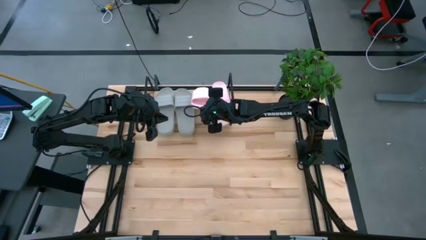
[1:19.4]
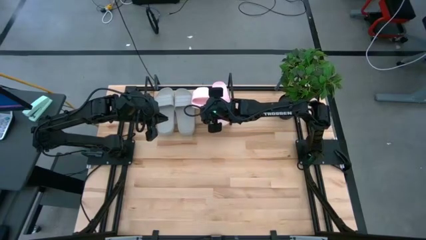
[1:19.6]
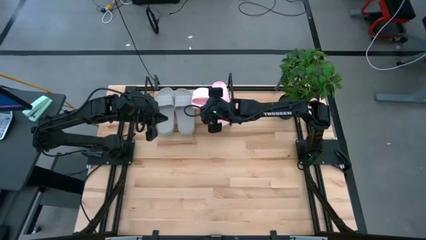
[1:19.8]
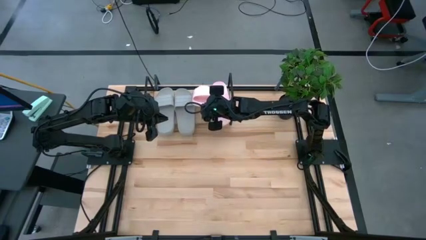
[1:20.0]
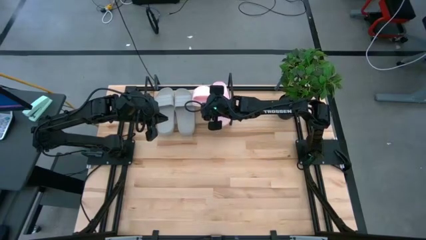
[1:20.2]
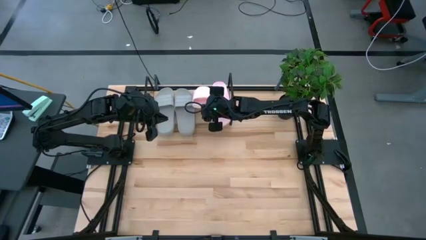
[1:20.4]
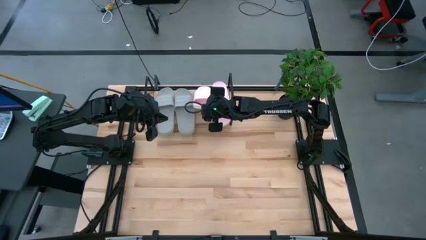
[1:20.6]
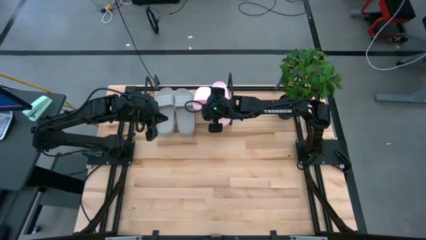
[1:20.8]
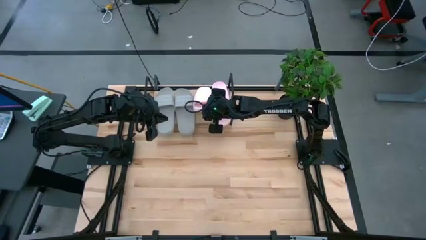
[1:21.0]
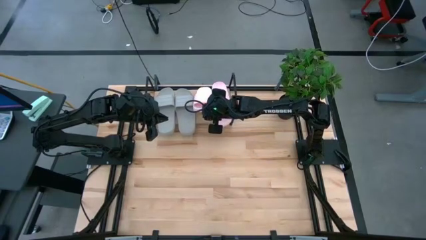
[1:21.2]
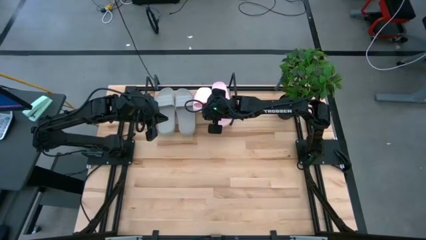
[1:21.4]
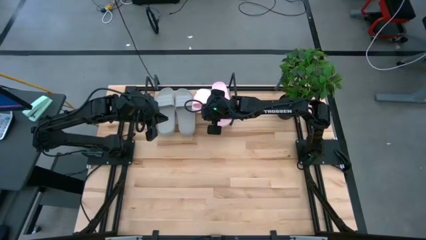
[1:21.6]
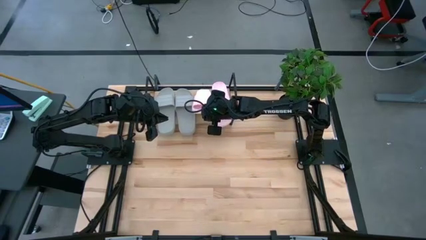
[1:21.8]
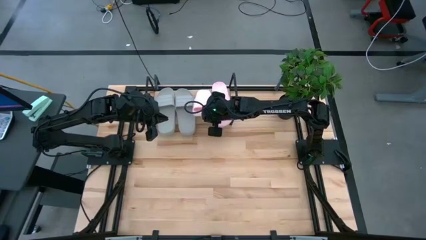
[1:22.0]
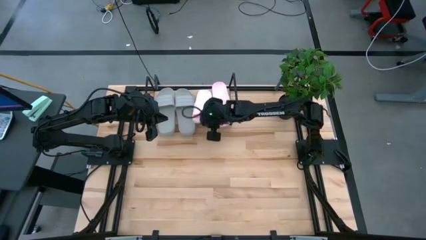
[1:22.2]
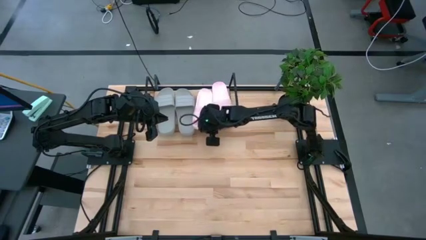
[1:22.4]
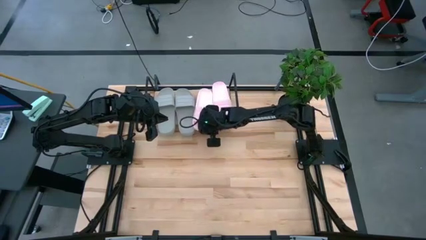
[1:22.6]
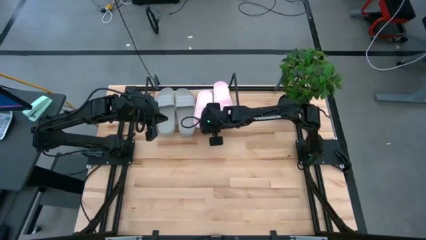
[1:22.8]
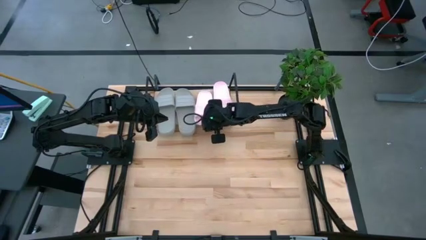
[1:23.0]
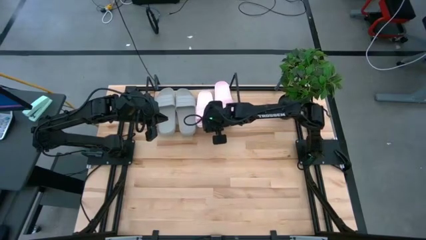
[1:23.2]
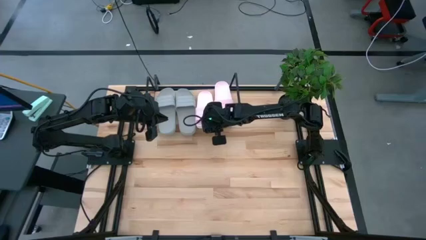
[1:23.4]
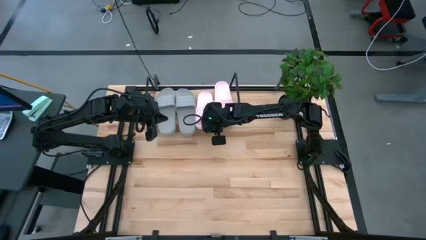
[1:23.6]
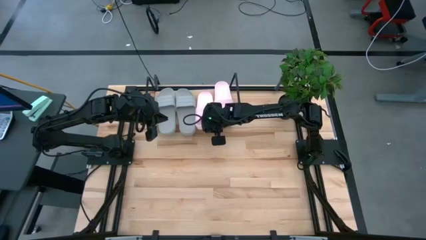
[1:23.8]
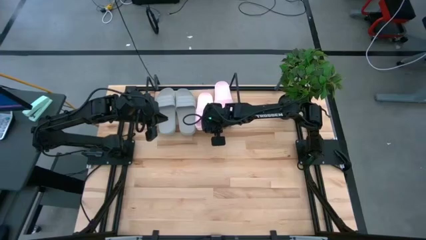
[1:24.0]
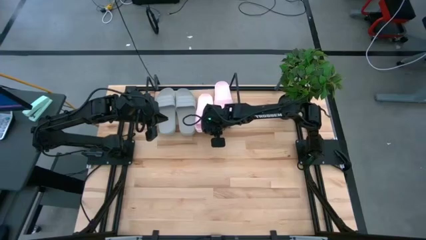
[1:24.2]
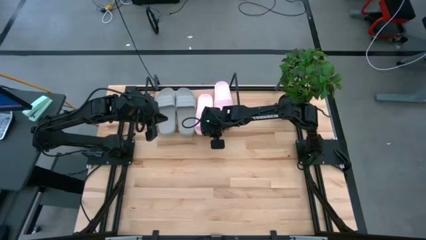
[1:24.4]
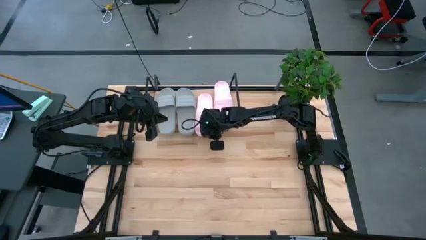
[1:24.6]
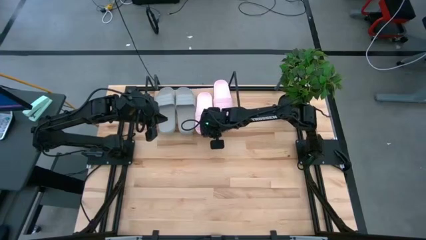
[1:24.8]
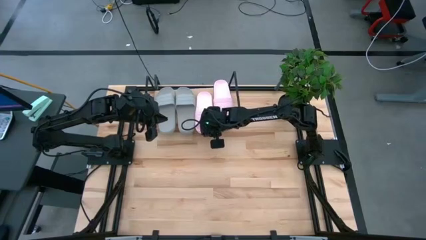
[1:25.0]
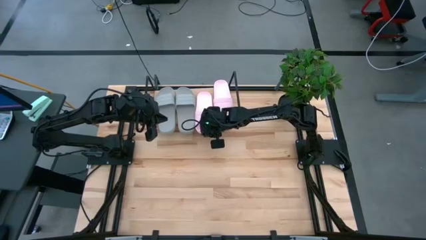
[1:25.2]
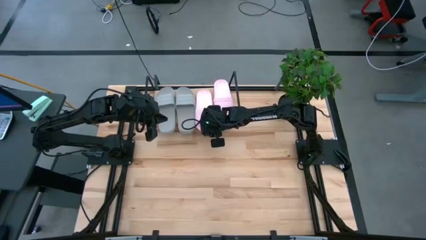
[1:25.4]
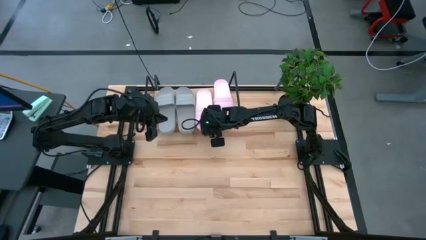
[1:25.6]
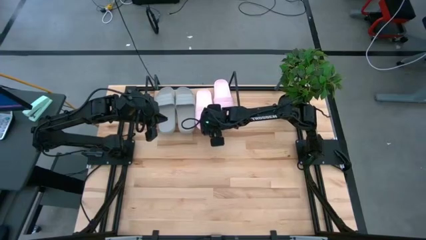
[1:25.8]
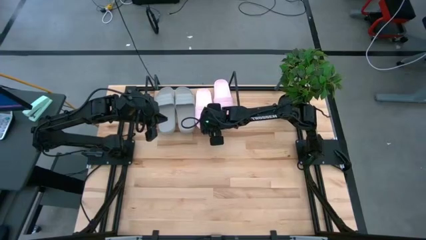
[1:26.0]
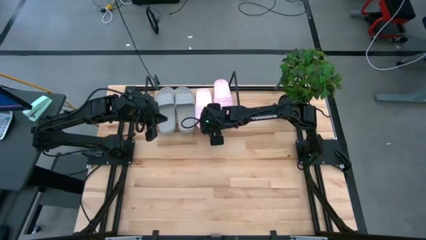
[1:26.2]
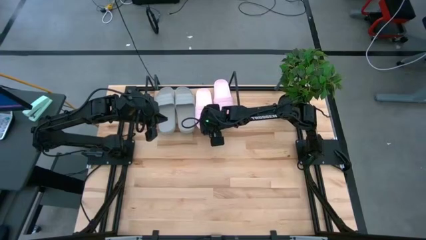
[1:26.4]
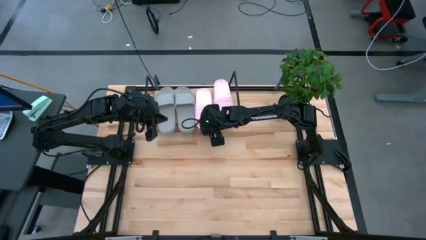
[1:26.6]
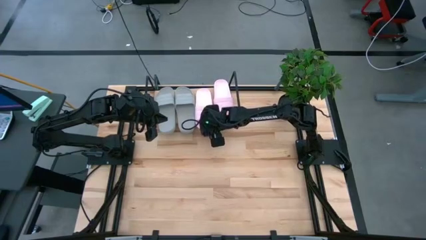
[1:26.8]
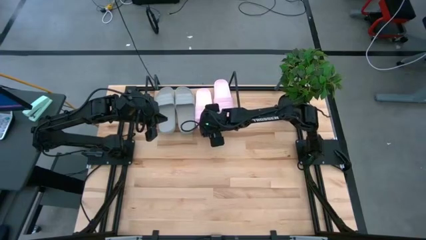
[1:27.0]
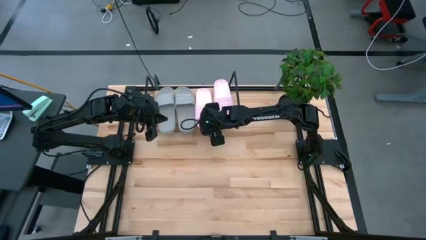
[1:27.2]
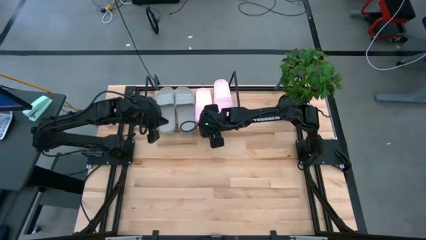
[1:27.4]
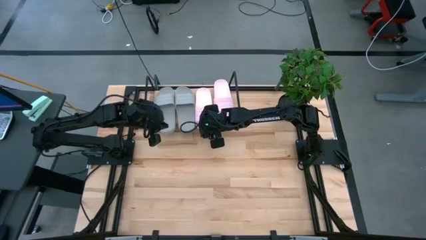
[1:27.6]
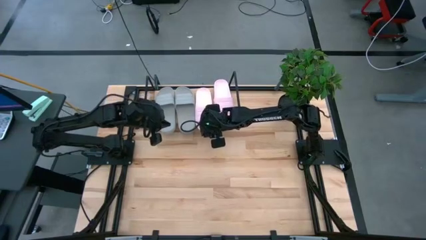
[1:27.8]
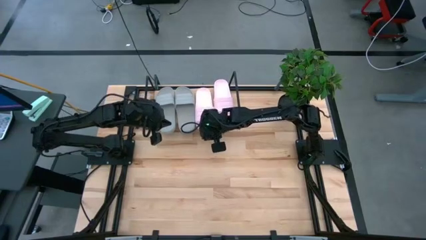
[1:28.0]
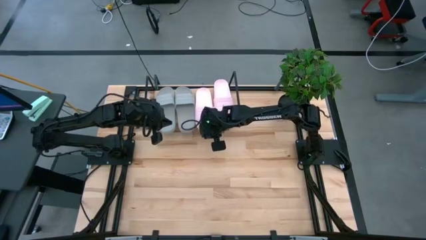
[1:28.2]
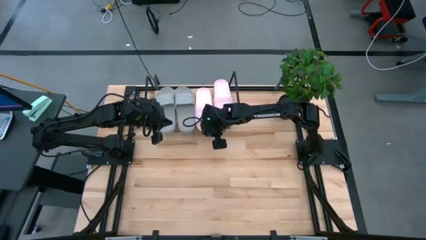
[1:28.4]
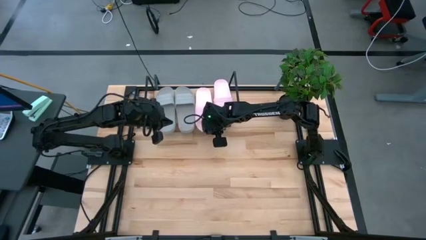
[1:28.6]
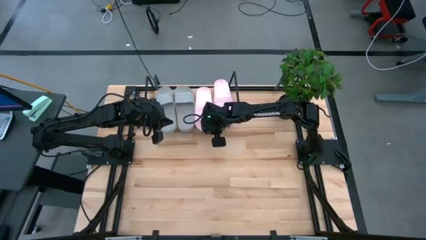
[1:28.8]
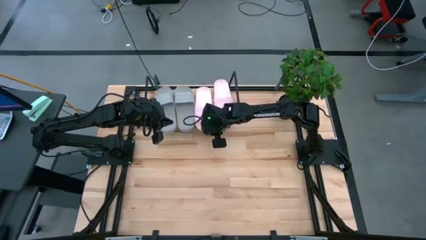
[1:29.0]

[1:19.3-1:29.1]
Task: Pick and place slides into the shelf
Put the pink slipper on the shelf

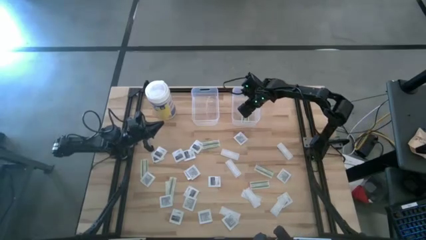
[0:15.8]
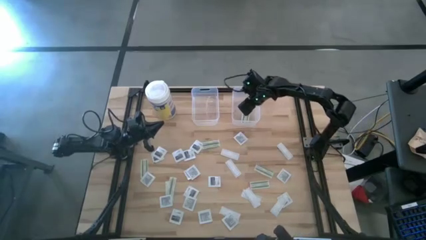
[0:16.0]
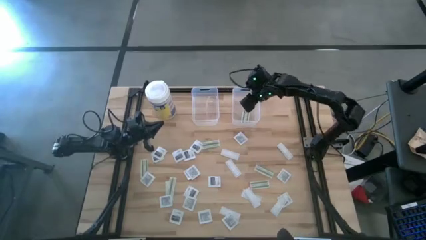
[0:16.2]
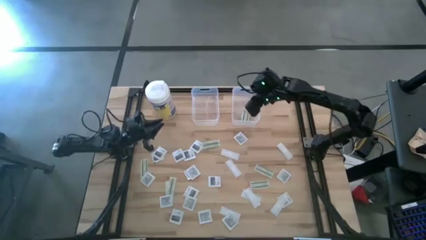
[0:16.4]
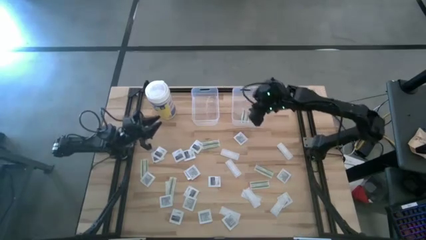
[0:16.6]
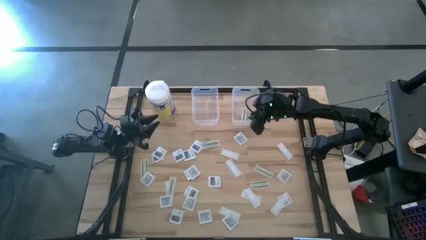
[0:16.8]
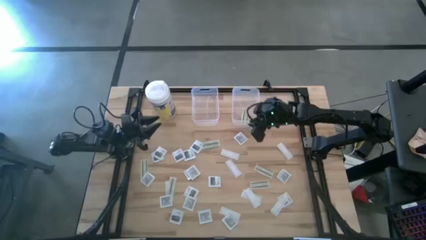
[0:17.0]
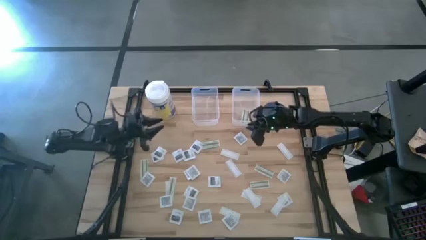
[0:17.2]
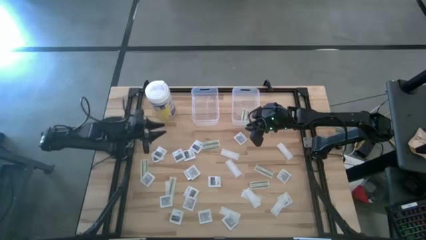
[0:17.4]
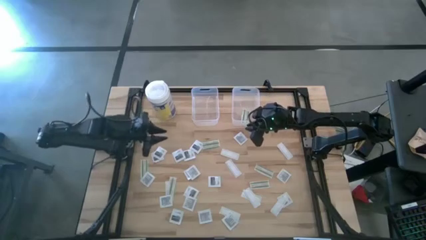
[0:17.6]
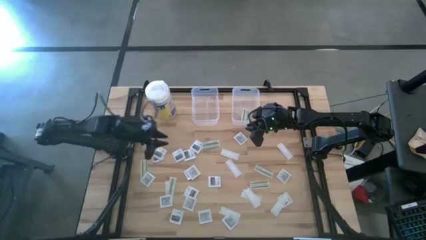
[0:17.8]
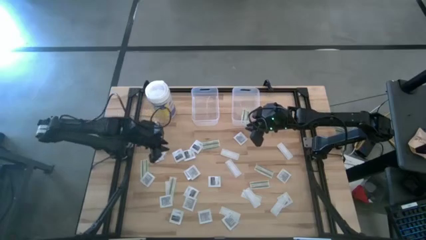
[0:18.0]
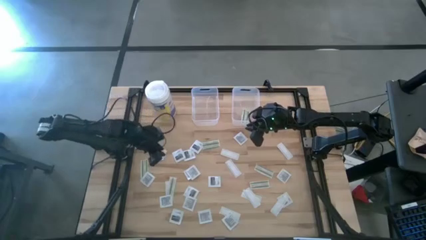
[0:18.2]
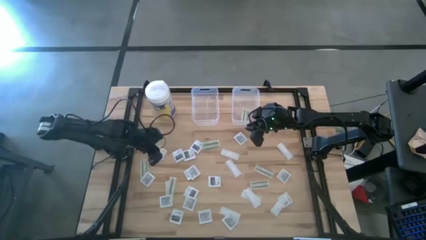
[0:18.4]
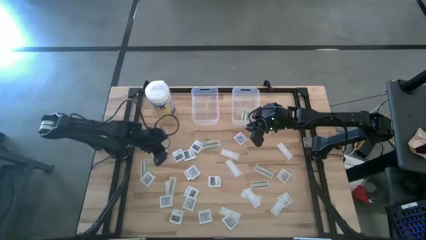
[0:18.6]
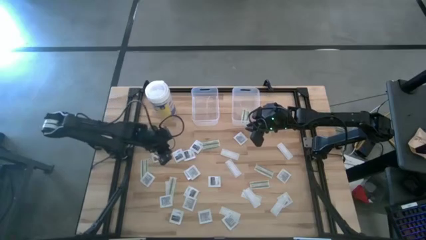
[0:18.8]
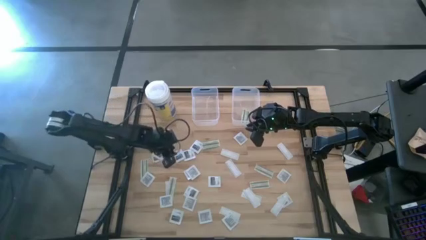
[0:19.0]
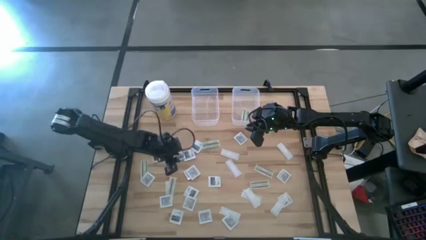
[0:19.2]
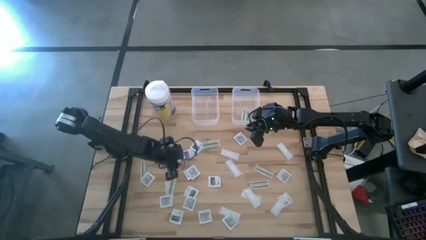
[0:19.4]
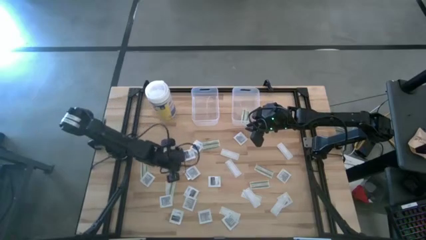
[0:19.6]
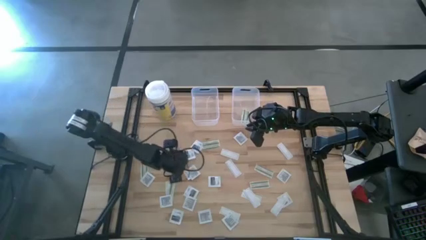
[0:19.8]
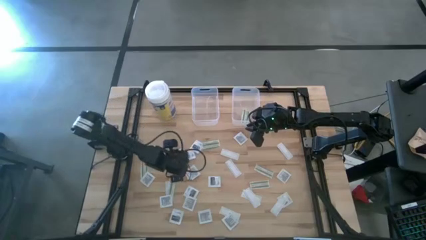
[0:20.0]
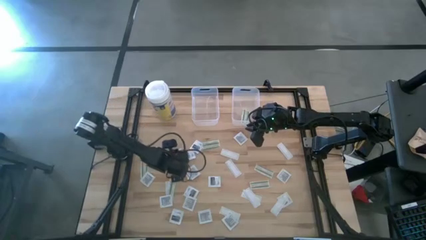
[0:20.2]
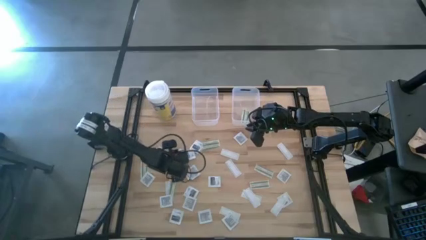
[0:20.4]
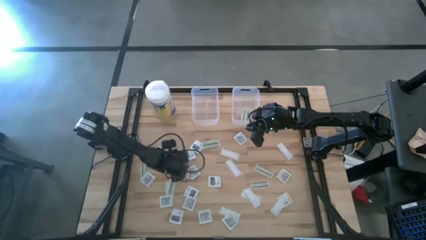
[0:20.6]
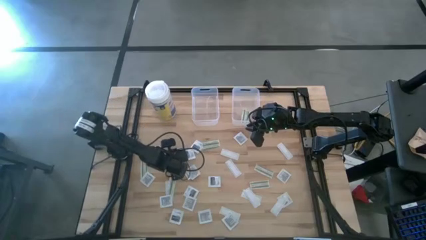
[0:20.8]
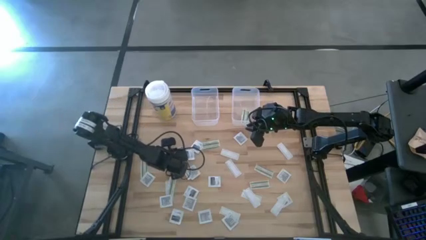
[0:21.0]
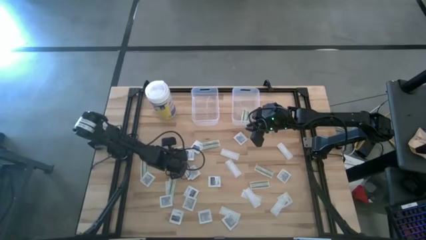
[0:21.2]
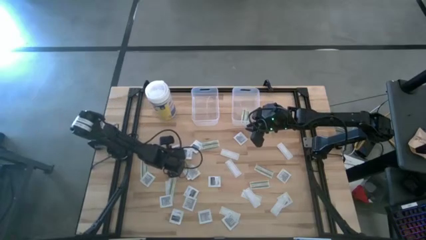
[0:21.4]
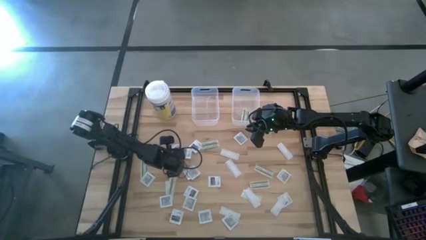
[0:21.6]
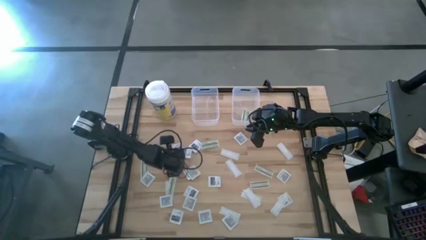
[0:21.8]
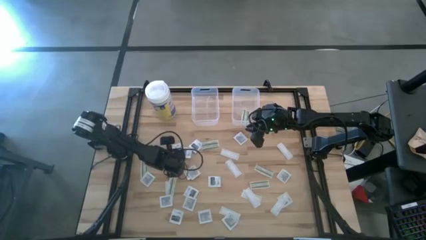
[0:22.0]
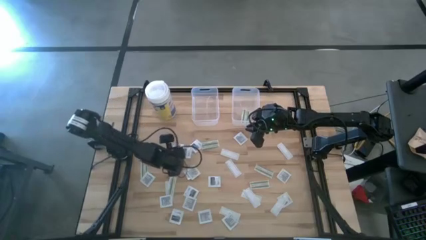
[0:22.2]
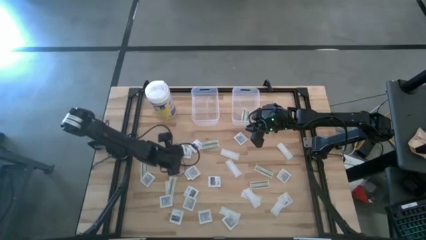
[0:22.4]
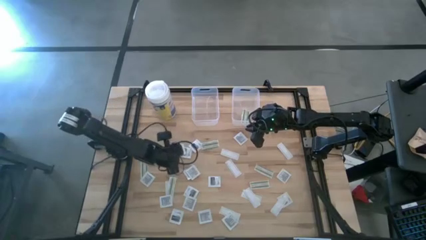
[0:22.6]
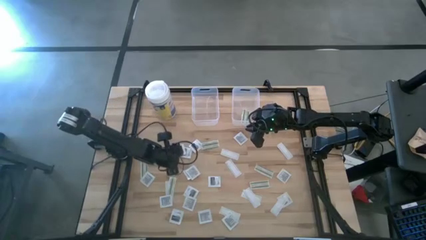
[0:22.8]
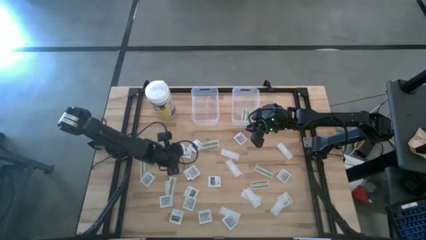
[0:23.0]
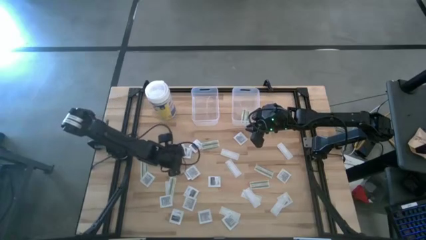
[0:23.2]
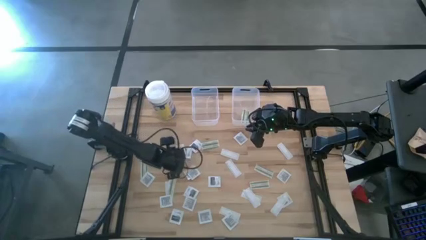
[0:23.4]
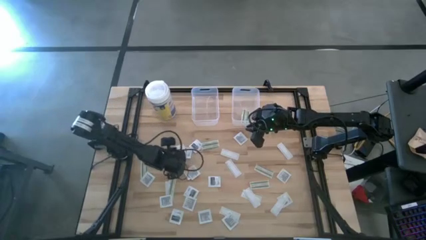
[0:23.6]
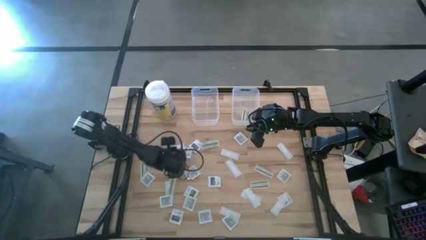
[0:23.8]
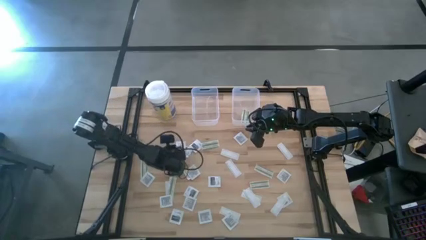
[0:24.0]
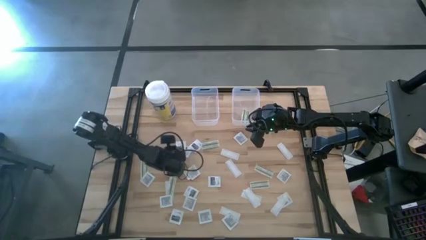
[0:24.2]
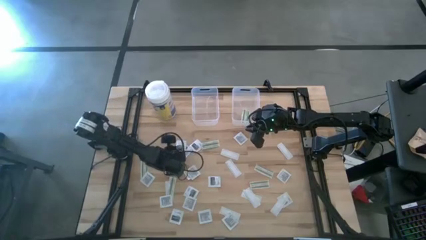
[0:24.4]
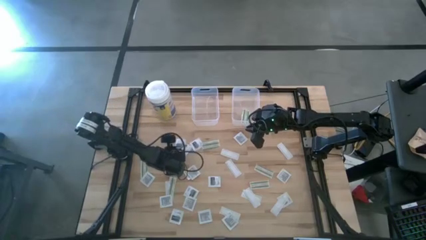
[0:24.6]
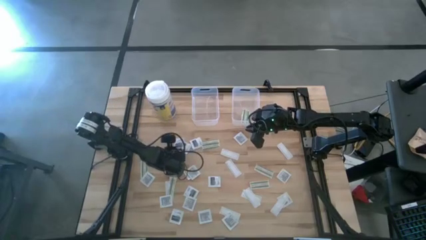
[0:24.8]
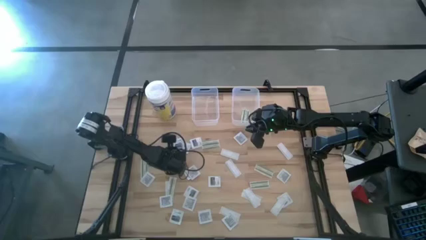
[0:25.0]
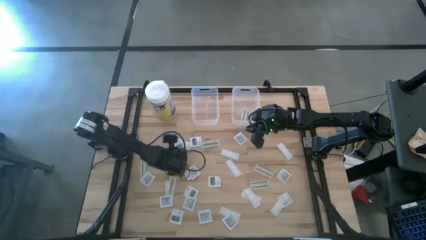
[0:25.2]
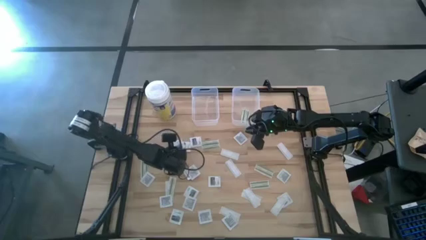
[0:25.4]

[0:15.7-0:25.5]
Task: Pick & Place First Aid Supplies
Put the towelette pack into the left transparent bin
